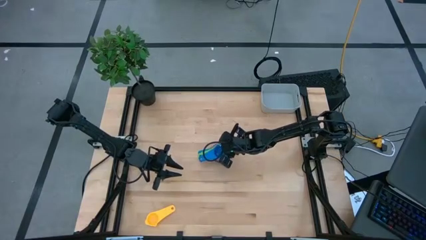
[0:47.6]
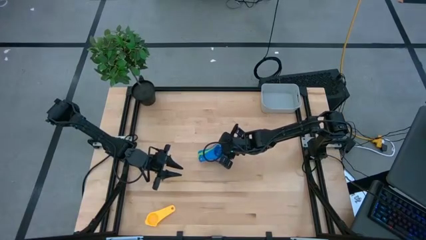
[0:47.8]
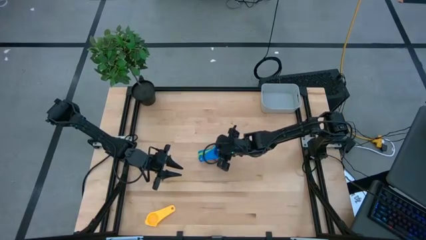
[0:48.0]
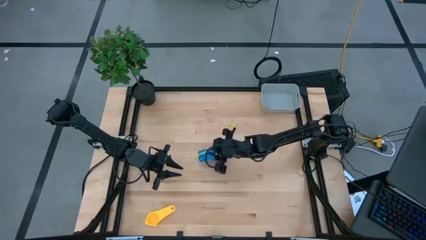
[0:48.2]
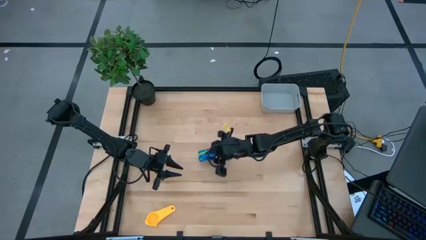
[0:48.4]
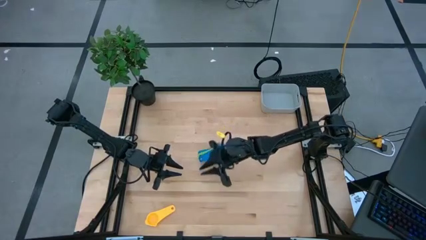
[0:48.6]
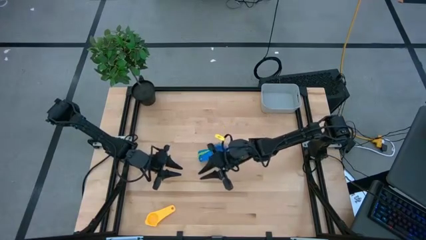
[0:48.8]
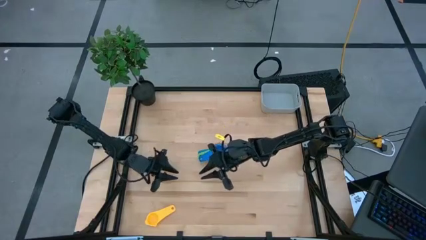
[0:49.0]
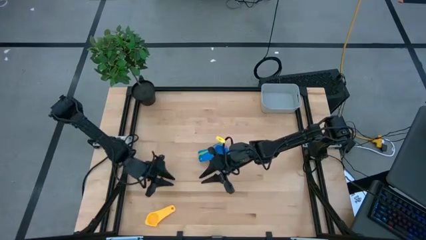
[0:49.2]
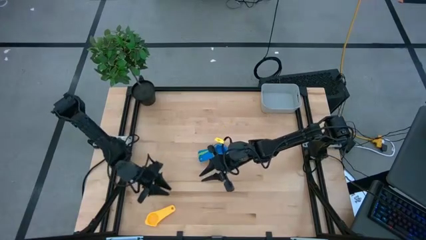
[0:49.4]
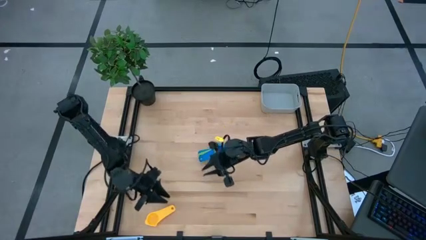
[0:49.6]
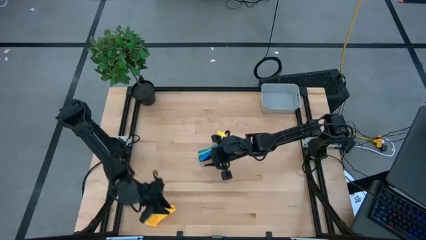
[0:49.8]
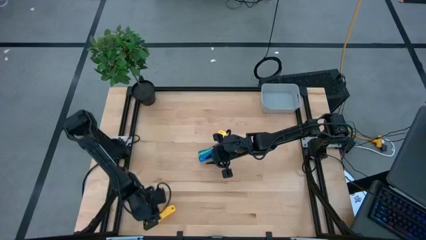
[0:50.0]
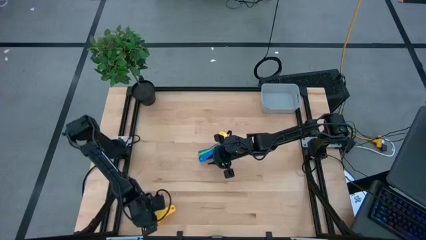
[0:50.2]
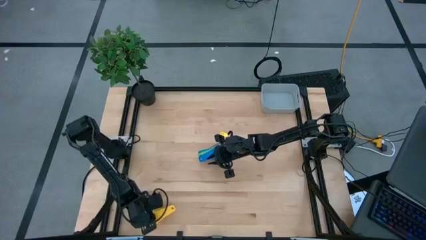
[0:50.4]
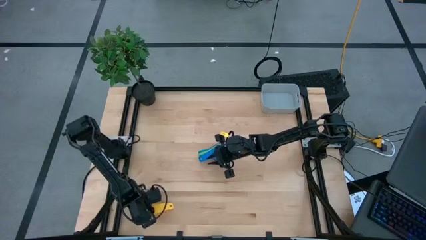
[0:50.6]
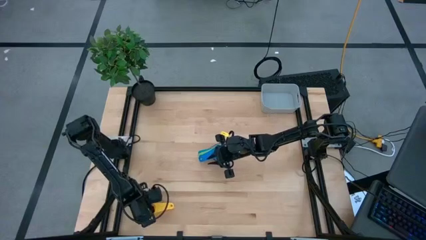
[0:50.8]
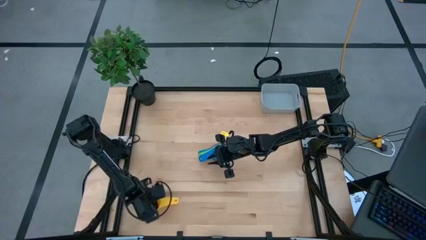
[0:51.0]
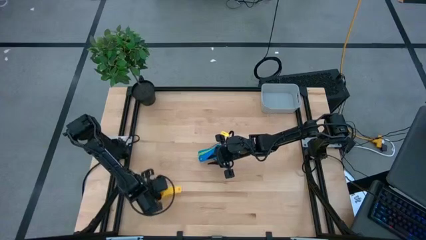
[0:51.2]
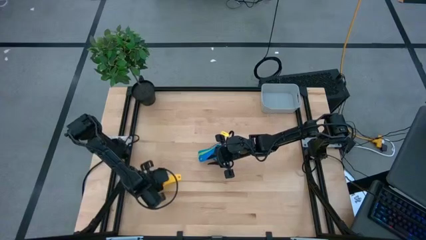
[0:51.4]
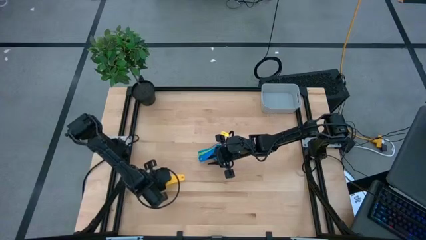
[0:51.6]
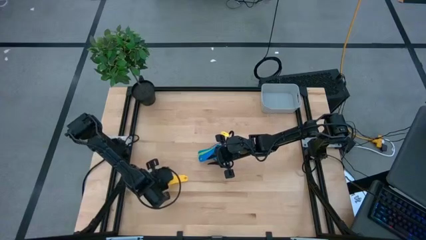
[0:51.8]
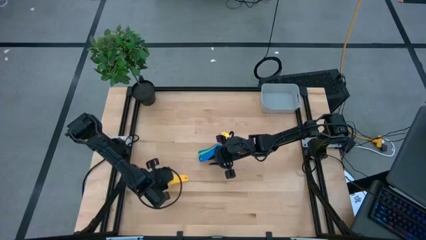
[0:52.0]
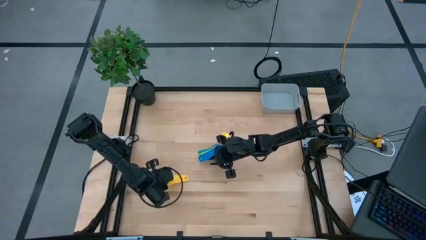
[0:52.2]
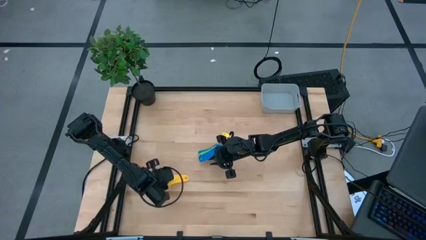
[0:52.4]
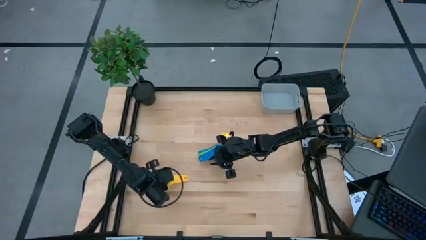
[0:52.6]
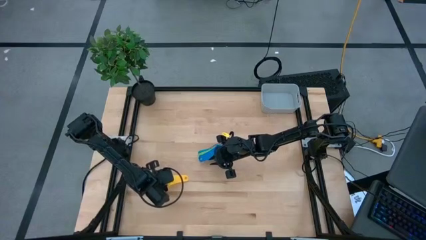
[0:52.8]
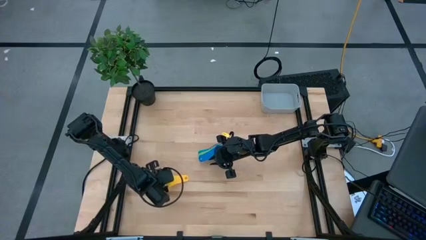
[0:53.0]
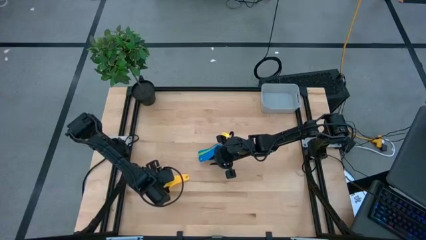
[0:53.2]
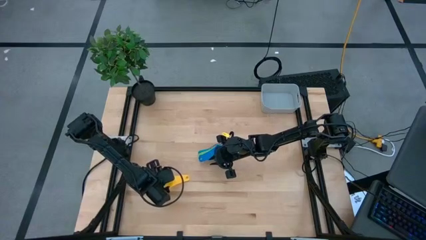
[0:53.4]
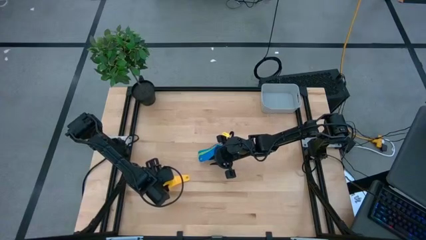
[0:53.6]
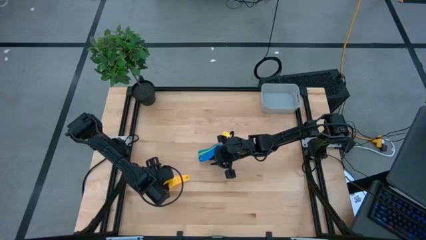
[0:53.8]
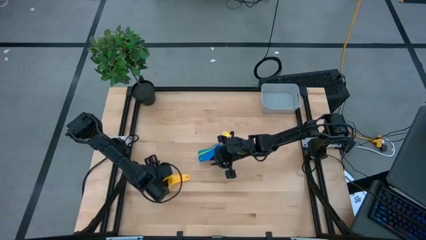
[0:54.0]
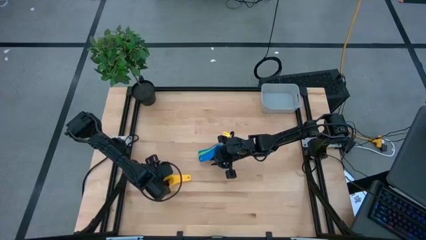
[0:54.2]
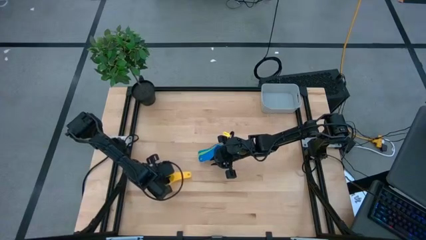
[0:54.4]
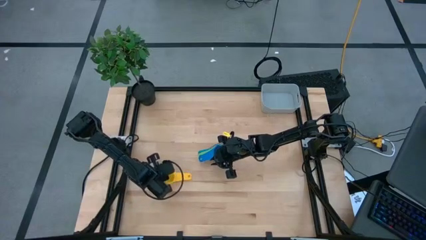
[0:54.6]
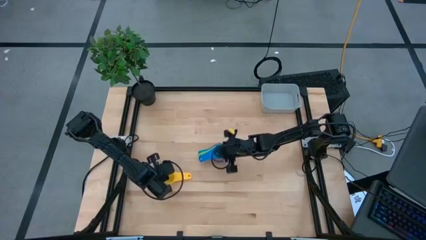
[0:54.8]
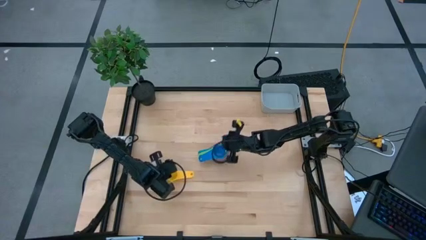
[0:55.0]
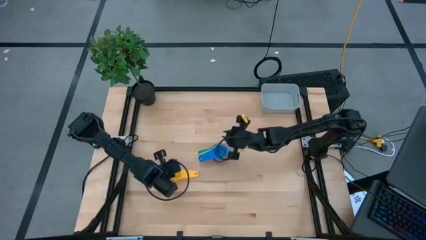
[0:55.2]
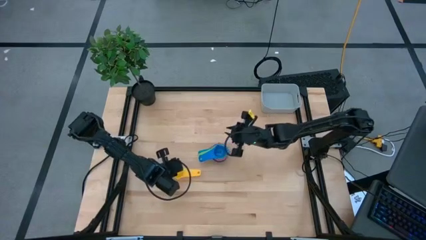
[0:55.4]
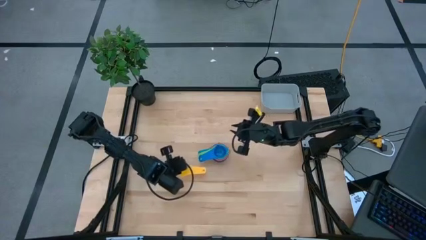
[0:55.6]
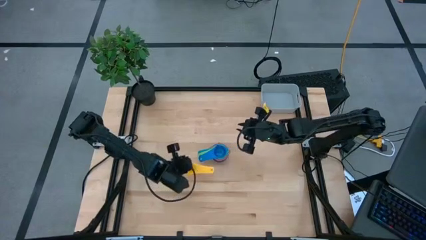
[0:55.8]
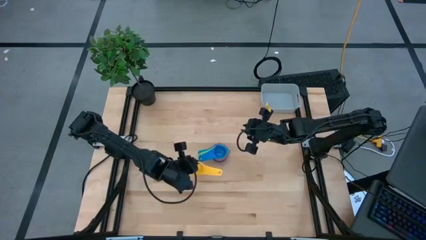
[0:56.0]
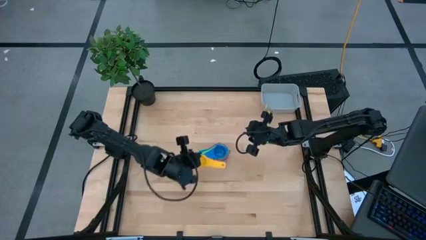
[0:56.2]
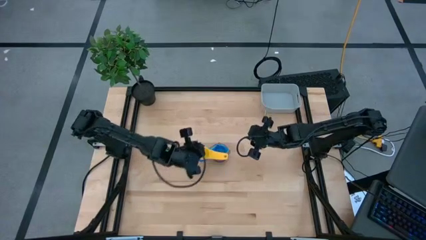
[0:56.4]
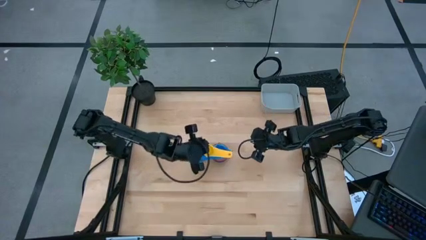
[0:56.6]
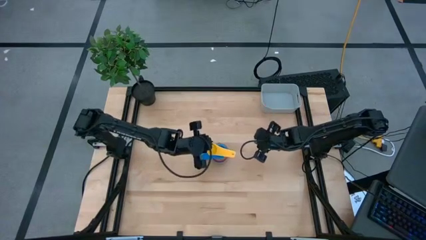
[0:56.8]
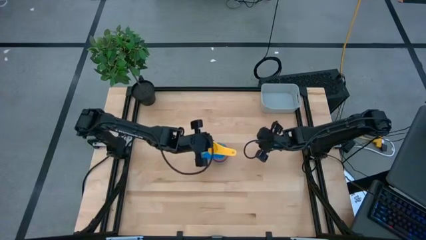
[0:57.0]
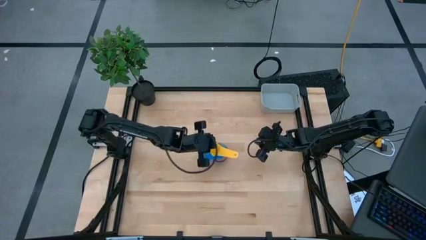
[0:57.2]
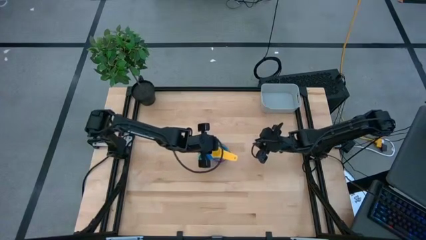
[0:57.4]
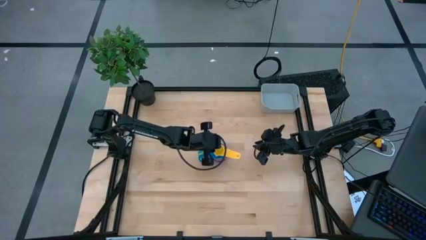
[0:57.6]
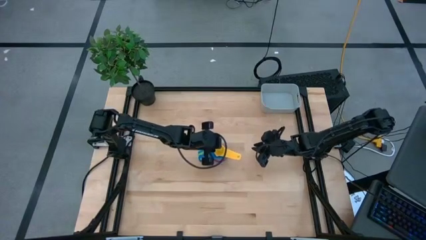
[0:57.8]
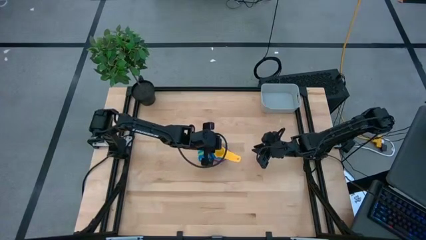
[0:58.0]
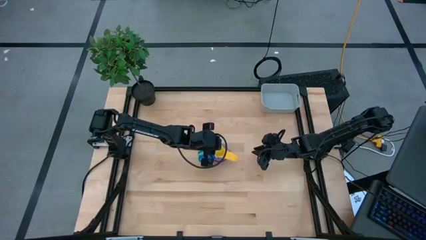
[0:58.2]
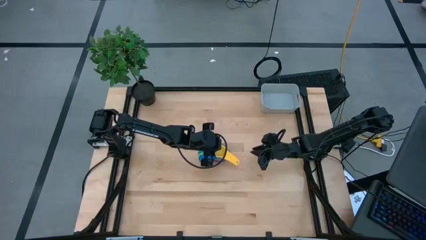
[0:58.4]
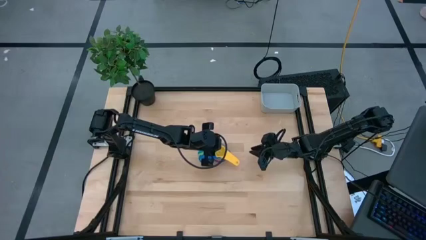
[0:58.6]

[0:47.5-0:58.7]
Task: Nest measuring cups in basket
Stack the yellow measuring cup on top of the blue measuring cup

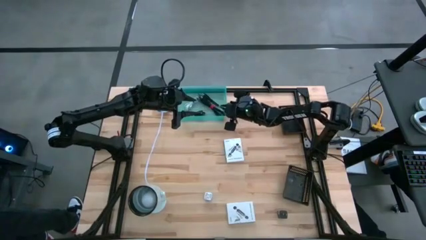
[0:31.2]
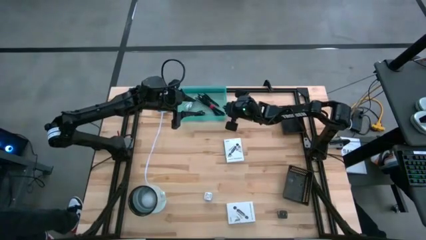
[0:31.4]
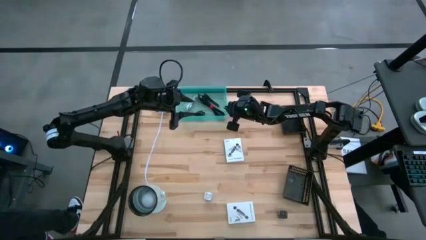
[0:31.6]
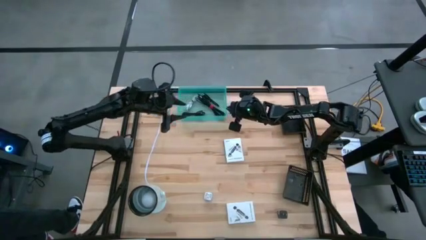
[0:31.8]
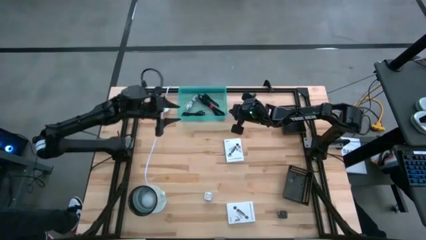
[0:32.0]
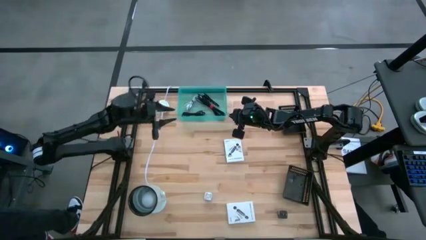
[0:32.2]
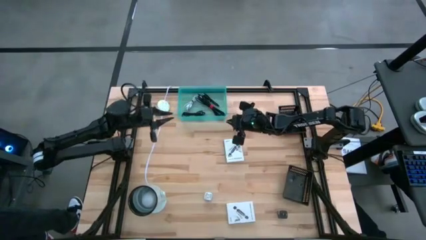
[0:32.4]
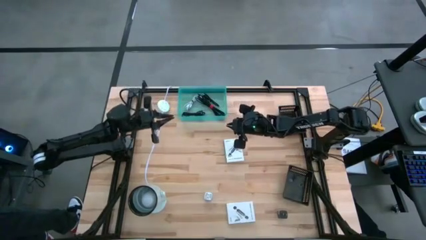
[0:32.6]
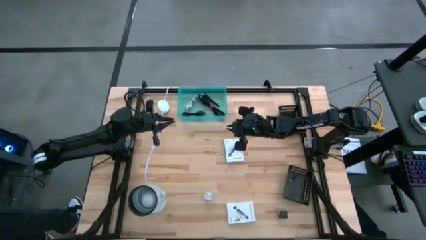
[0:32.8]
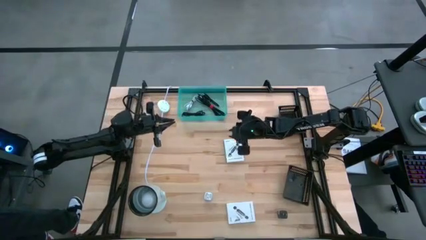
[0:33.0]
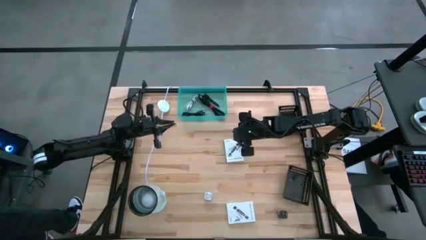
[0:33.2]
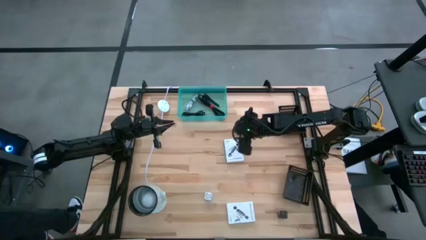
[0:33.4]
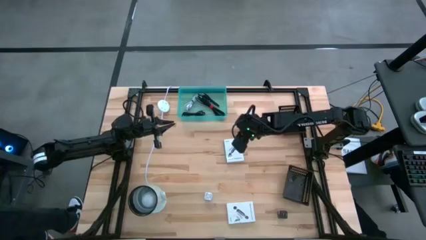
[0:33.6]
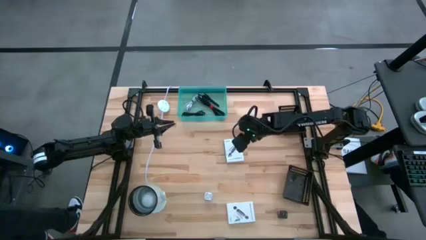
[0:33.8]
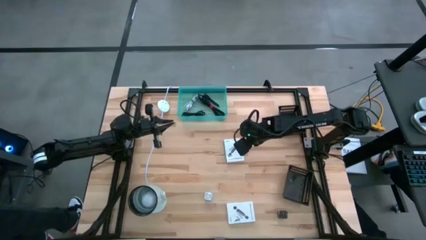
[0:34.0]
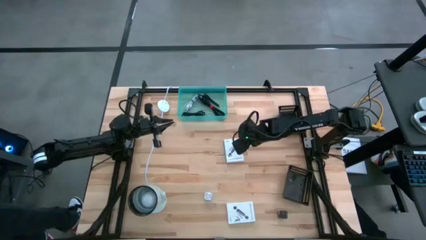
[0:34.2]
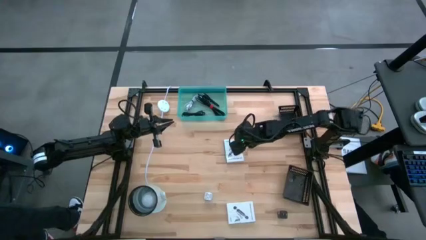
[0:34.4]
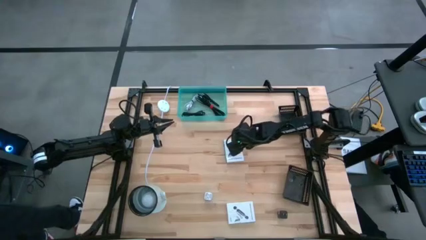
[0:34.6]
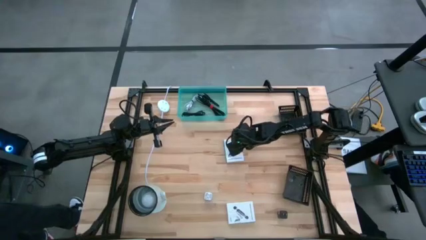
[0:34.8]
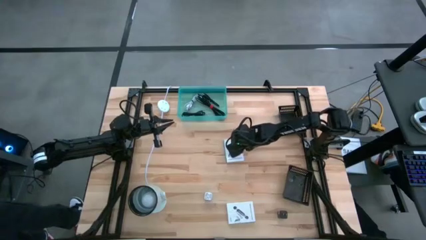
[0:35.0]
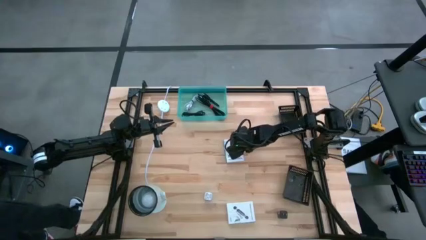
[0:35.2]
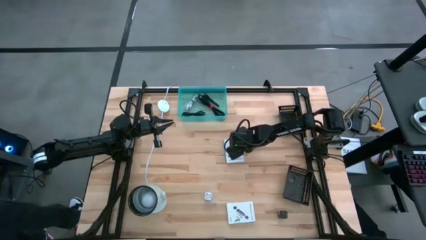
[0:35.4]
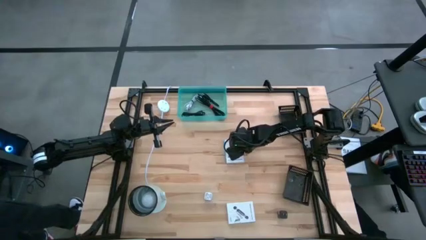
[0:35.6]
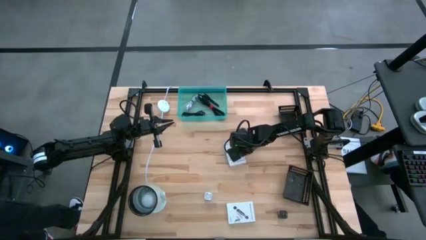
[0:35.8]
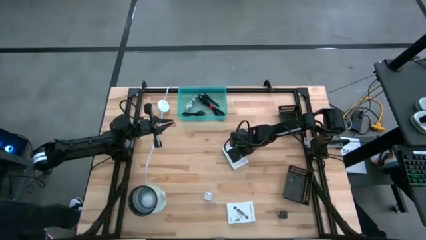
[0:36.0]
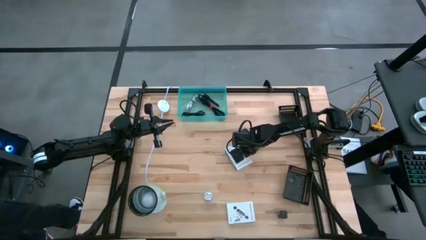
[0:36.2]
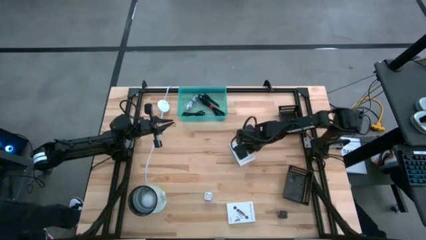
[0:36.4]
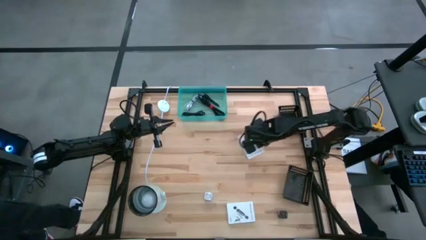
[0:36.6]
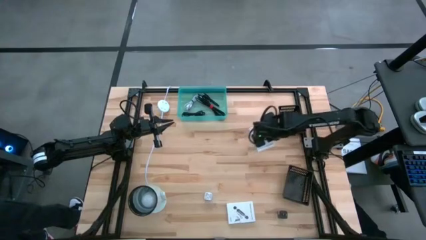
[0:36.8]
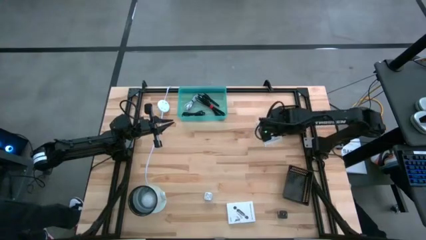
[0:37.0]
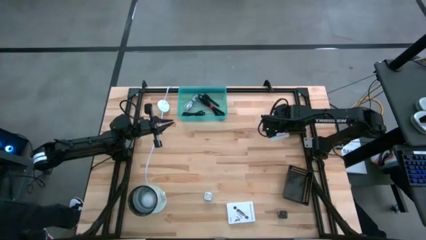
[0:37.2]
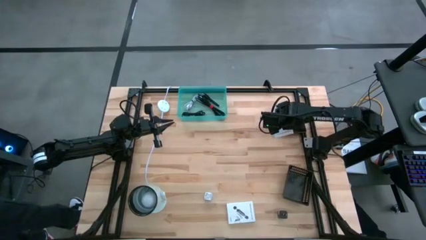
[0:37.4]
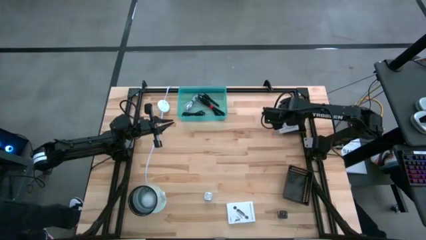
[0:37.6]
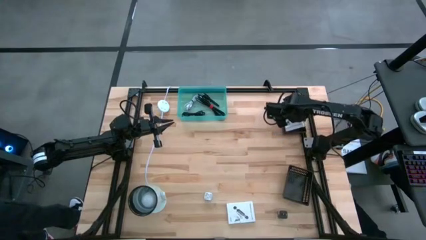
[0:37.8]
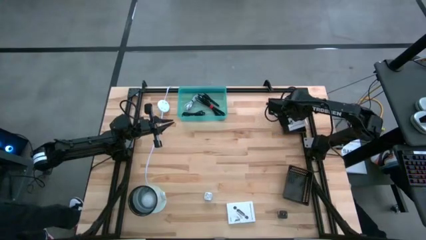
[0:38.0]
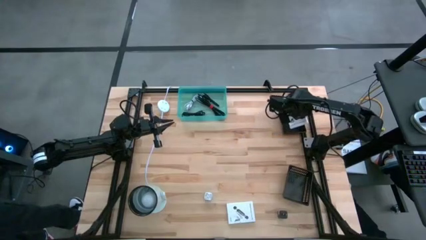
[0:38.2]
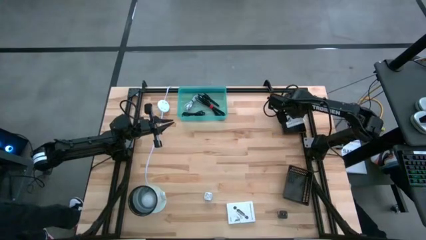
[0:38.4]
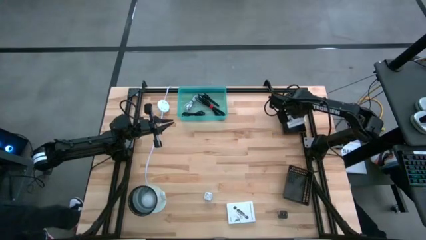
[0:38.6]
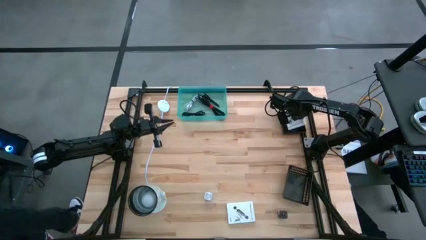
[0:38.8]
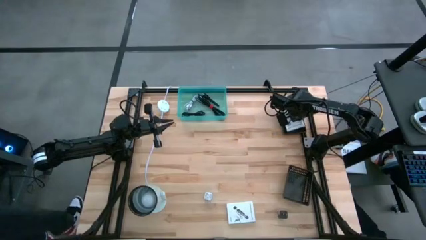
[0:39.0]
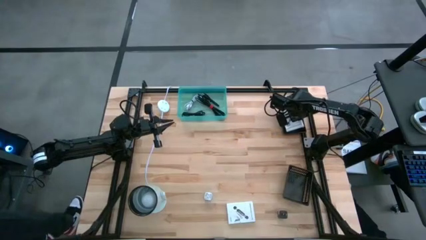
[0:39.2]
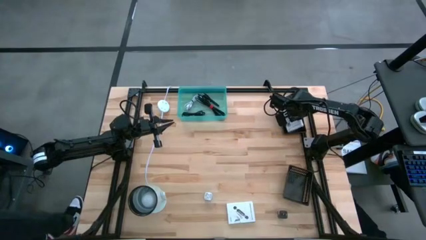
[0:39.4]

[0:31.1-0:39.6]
Task: Pick and place items into bin
Put the top card reader box into the top black bin
